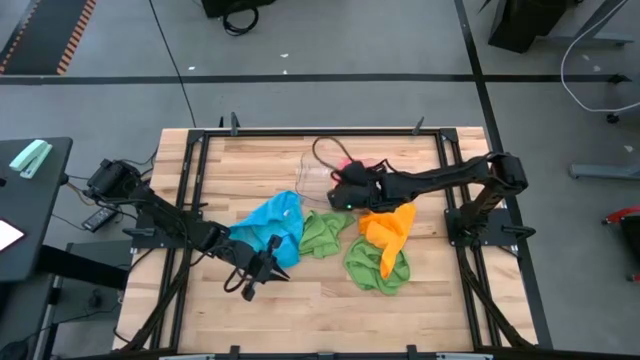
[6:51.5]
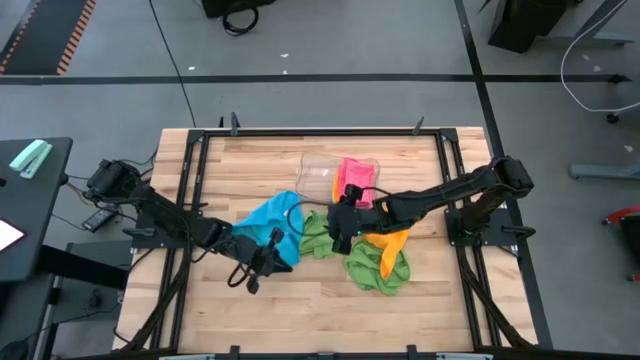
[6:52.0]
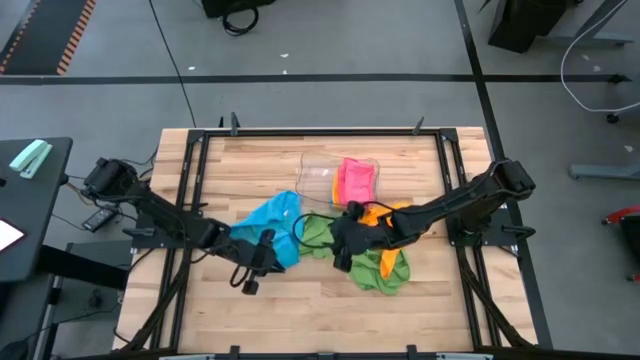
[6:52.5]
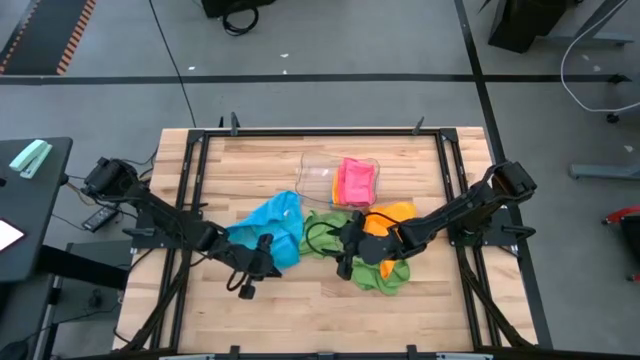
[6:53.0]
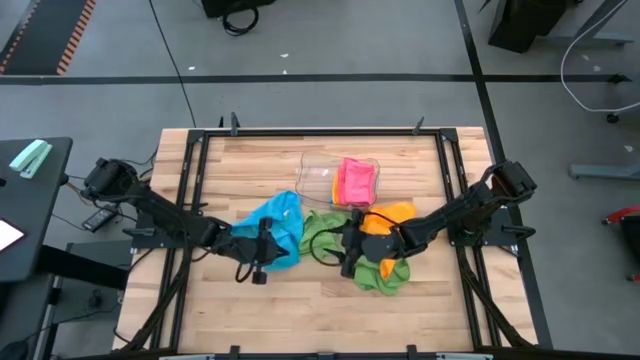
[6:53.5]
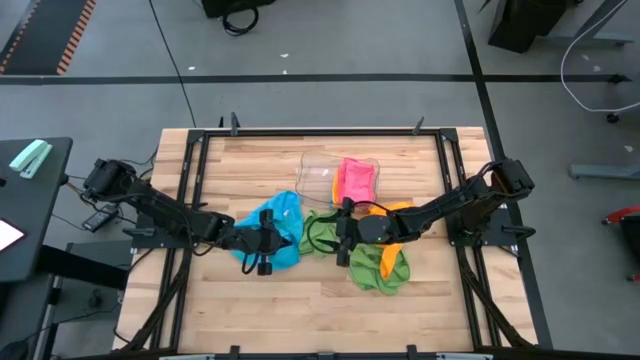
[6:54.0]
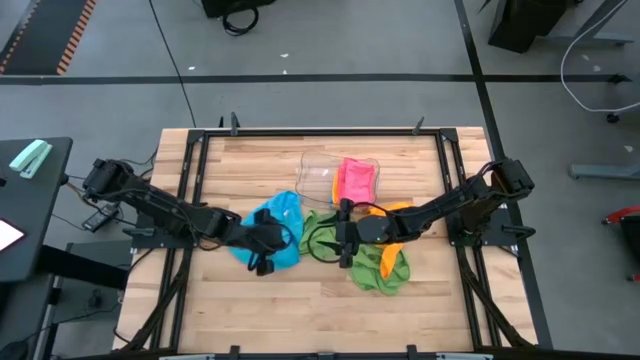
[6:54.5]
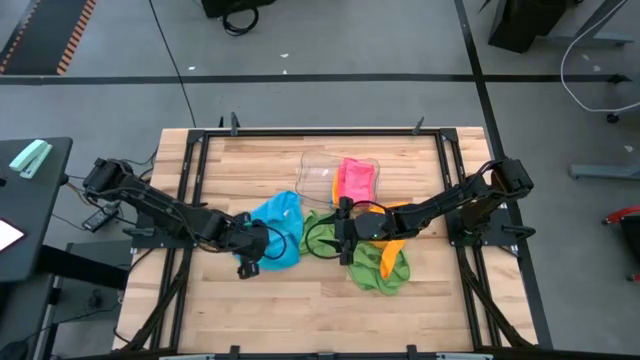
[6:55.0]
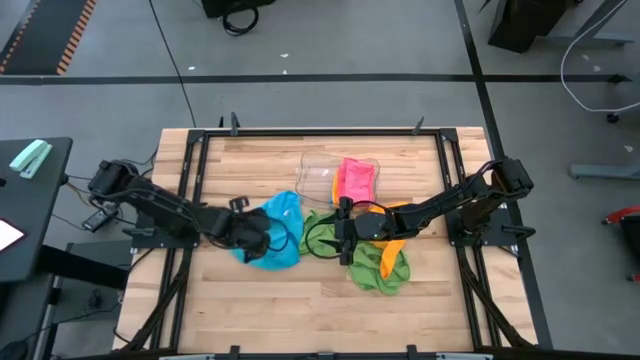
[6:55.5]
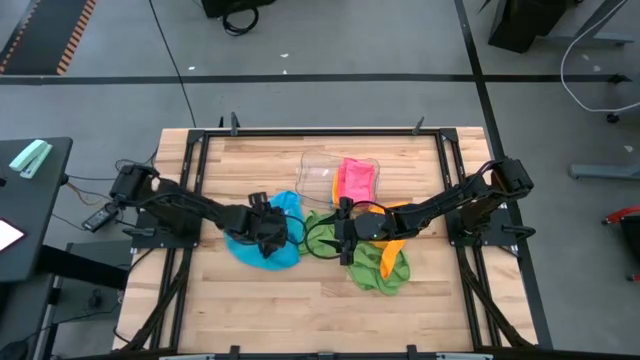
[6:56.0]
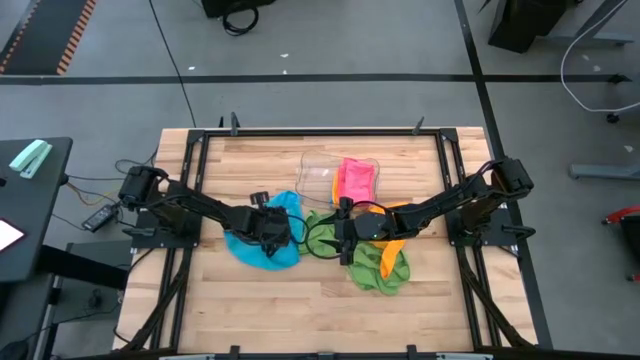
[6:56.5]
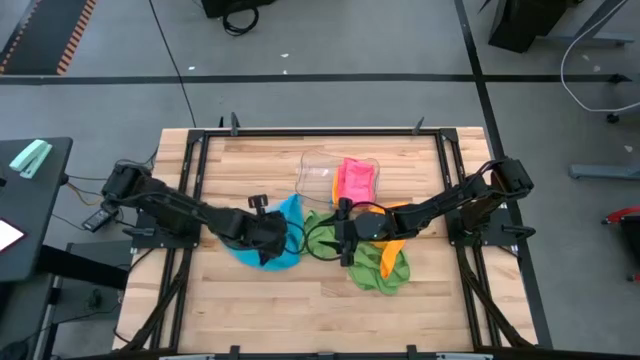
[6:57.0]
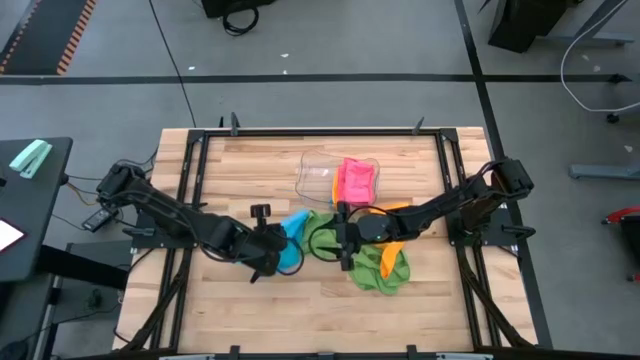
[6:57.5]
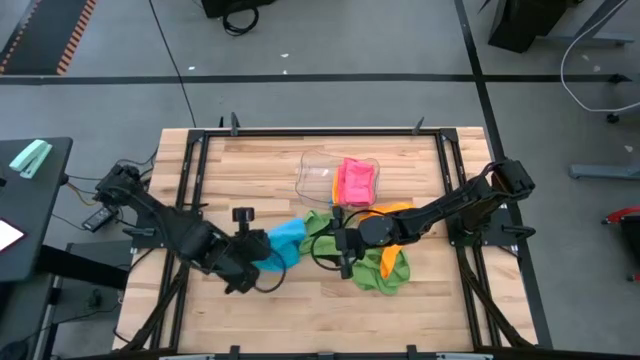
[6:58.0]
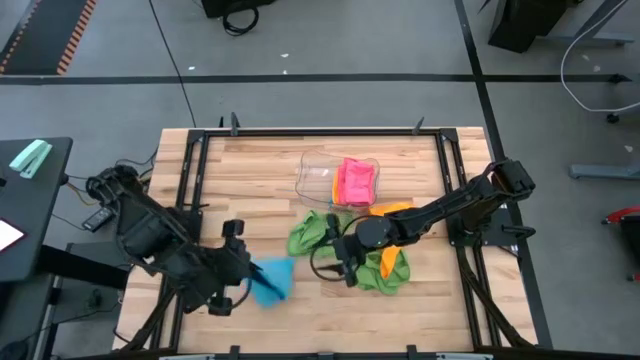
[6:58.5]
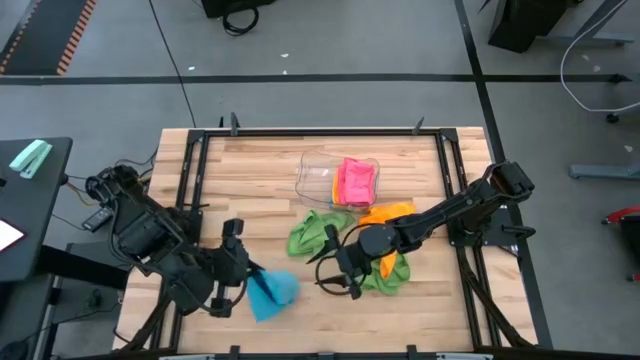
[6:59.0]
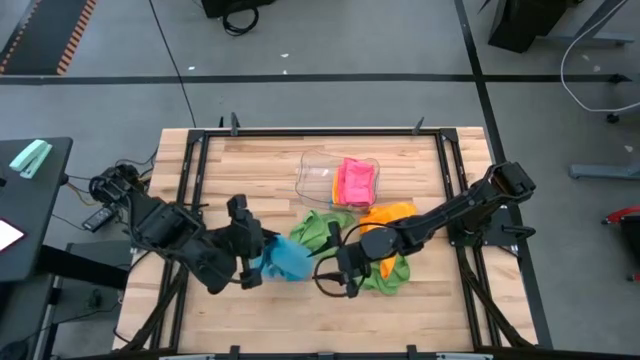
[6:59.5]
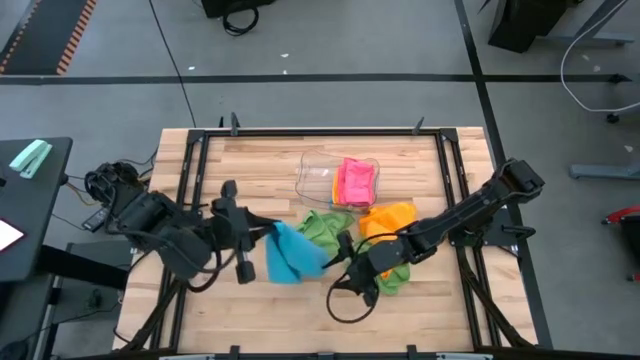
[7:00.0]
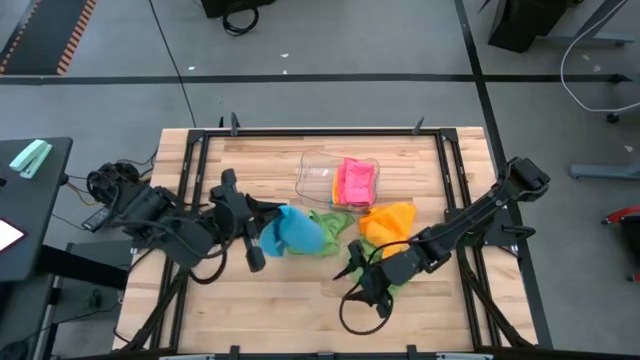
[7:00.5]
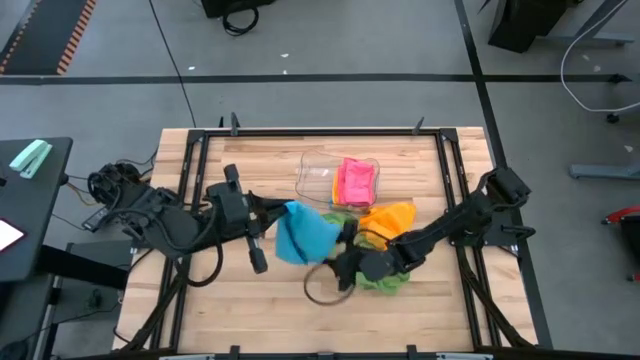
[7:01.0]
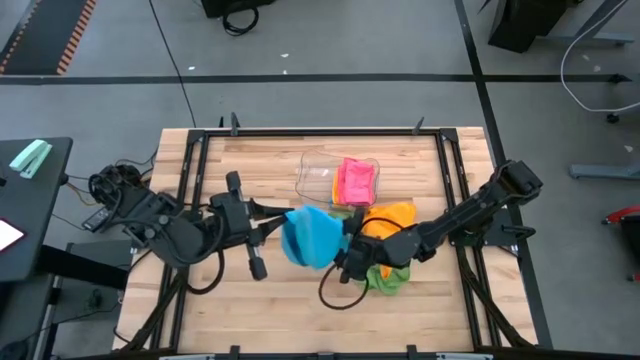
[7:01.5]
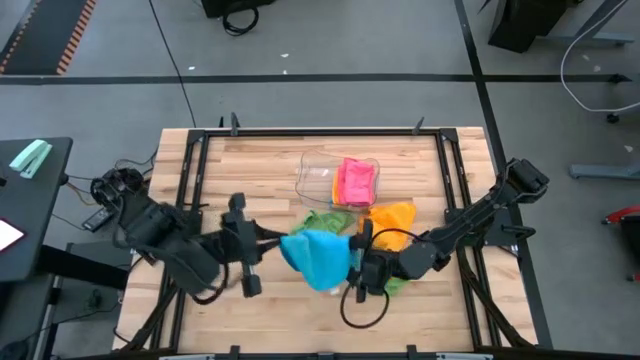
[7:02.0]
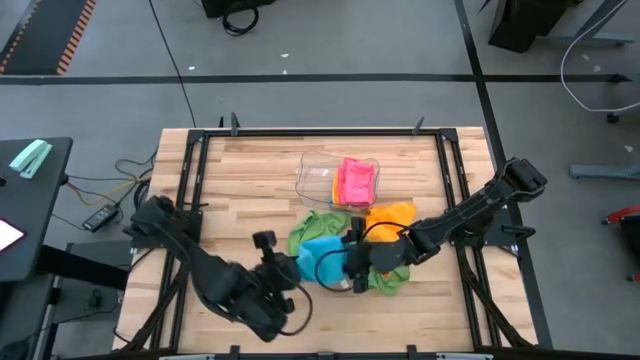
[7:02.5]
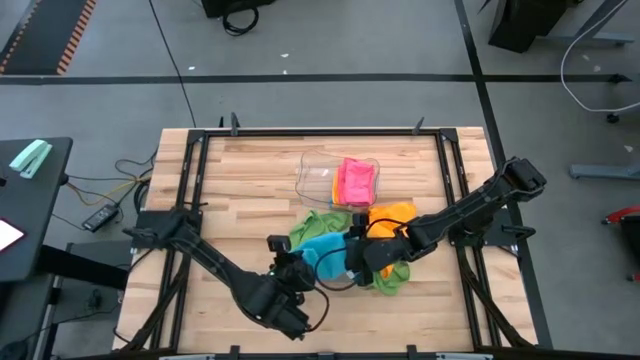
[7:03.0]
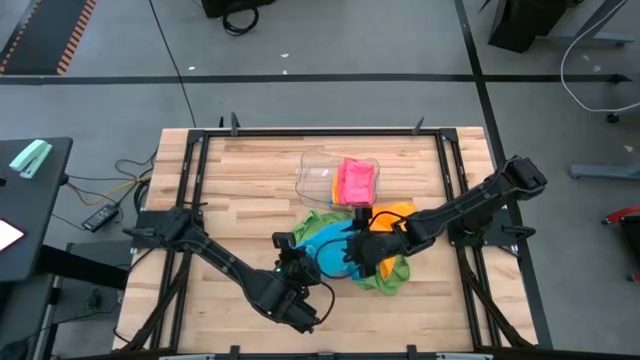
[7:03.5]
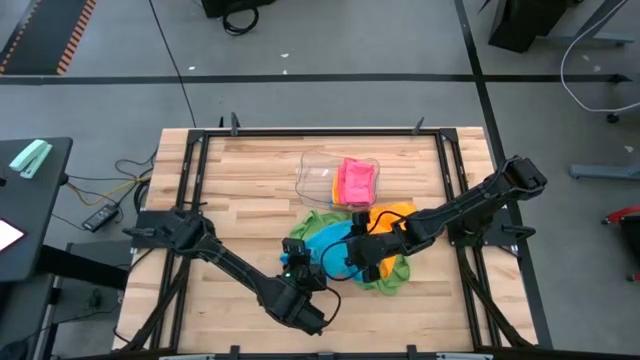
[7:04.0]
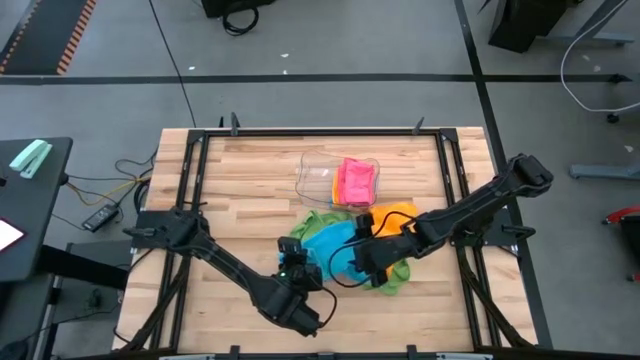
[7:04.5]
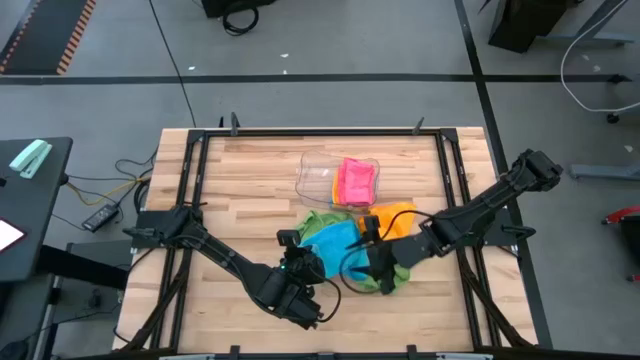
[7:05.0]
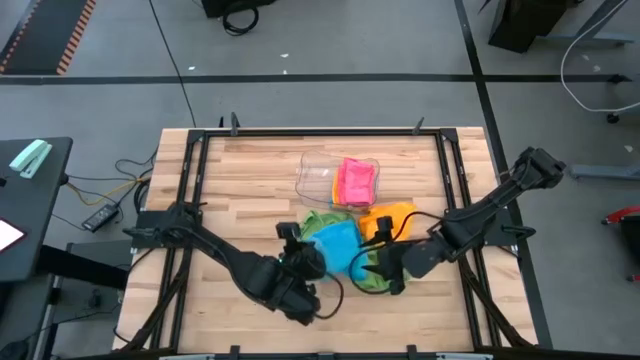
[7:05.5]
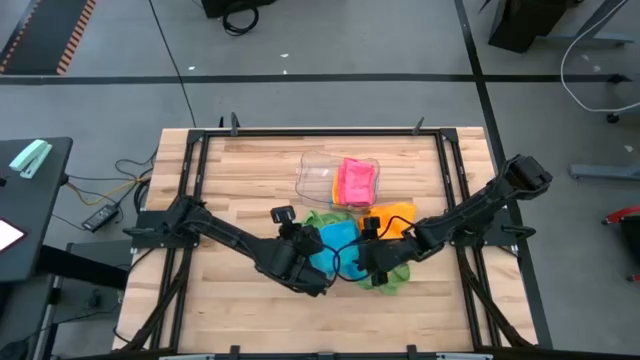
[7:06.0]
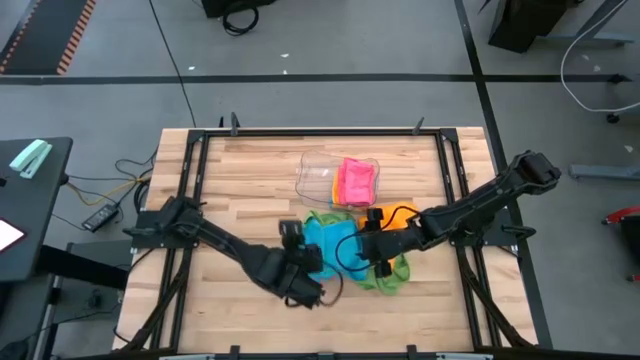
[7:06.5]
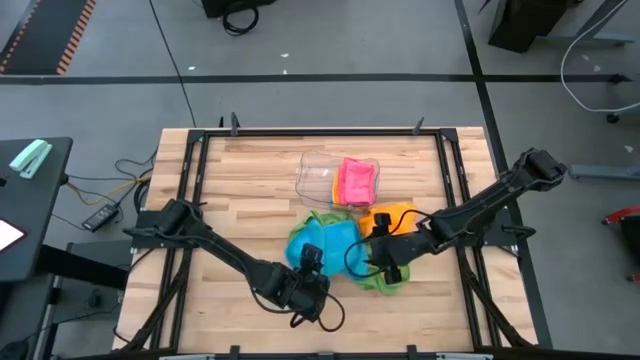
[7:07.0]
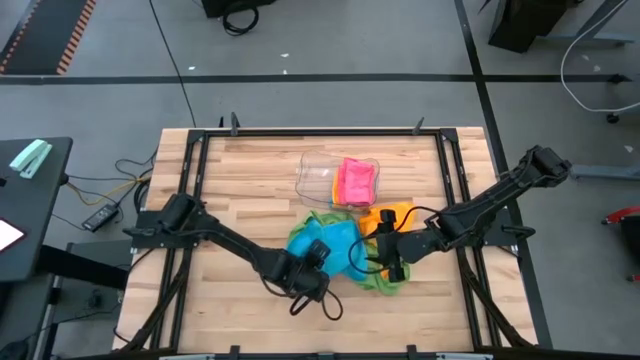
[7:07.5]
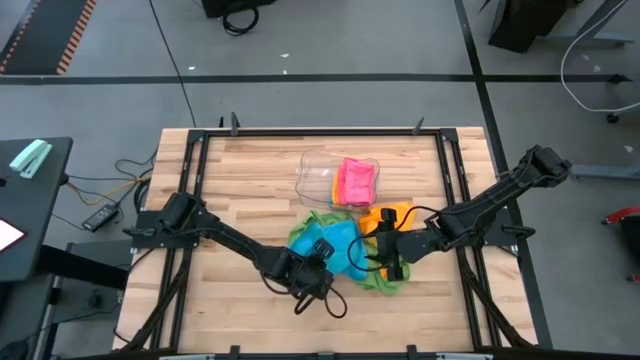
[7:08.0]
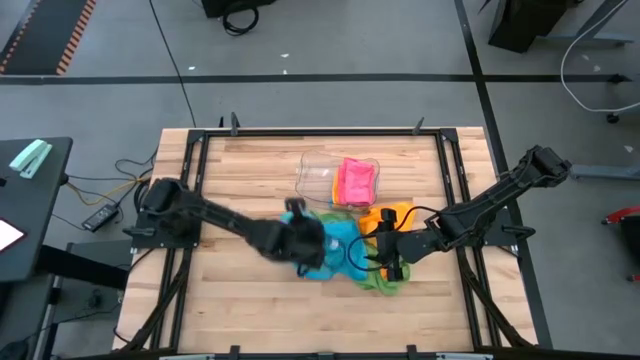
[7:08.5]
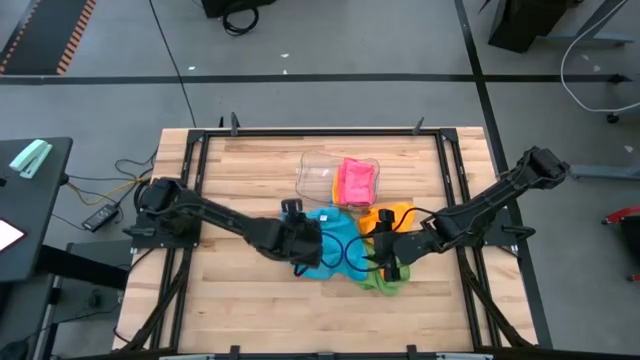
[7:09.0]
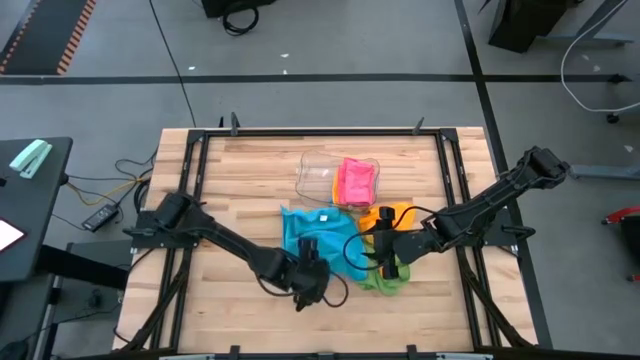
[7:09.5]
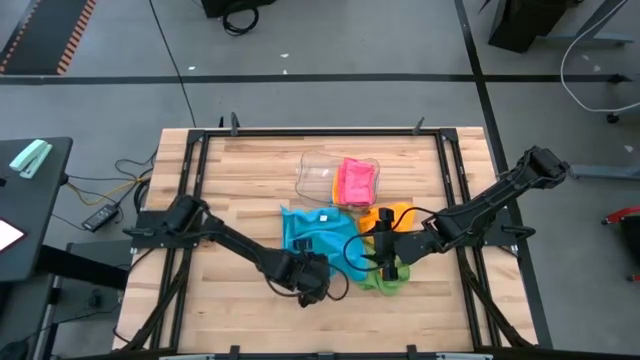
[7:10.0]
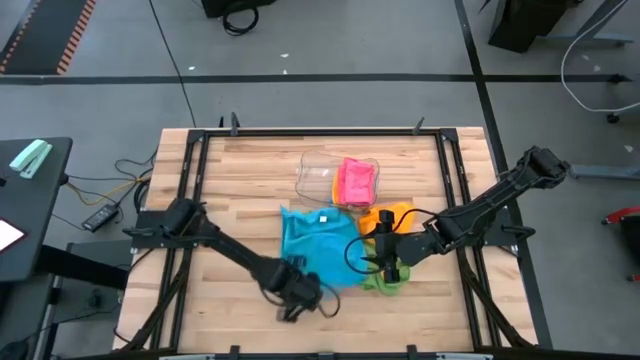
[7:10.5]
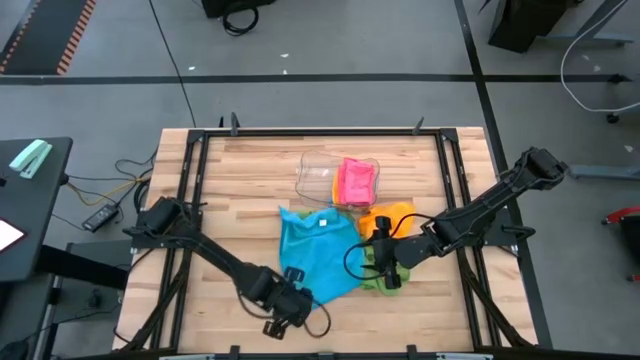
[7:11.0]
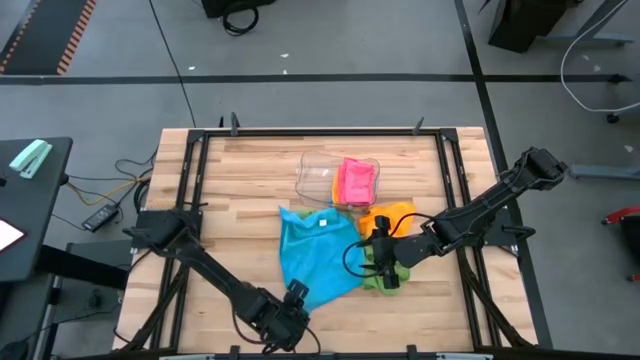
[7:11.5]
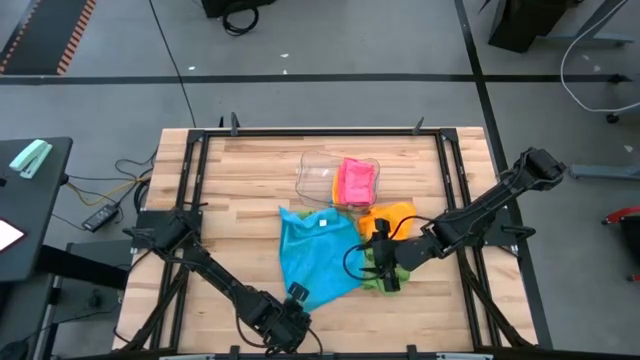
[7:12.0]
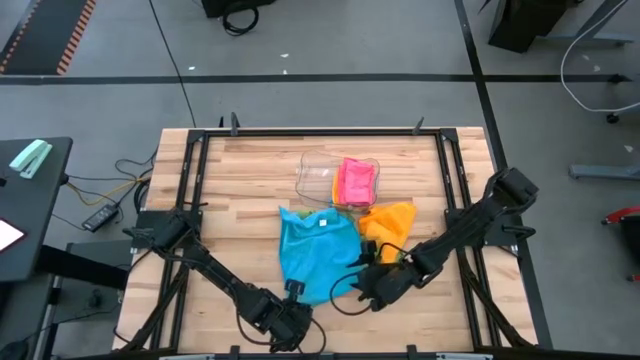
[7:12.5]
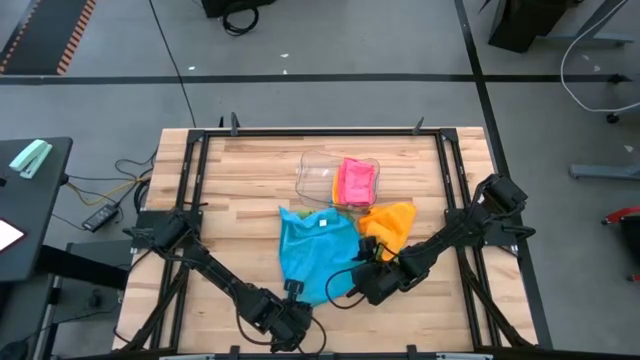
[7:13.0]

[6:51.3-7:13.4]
Task: Fold microfiber towels
Fold the blue microfiber cloth
